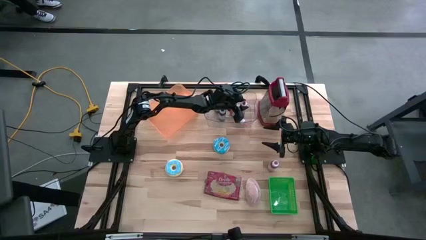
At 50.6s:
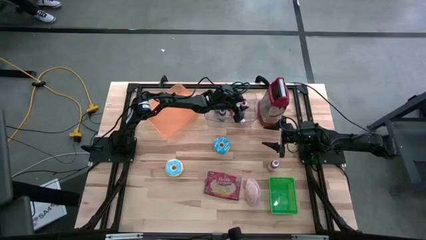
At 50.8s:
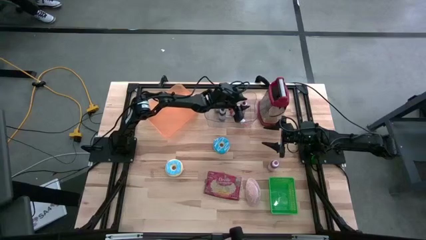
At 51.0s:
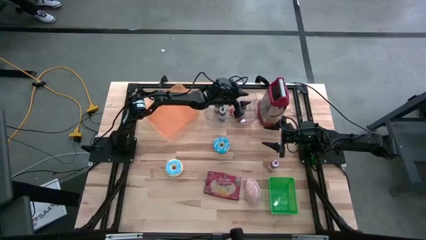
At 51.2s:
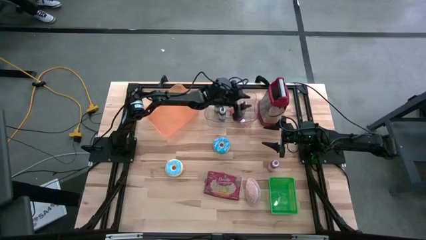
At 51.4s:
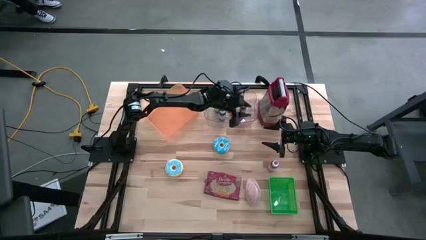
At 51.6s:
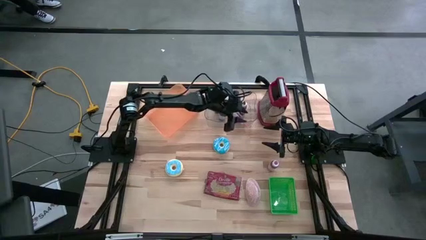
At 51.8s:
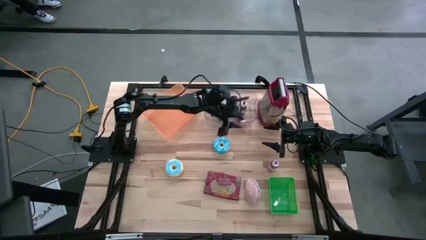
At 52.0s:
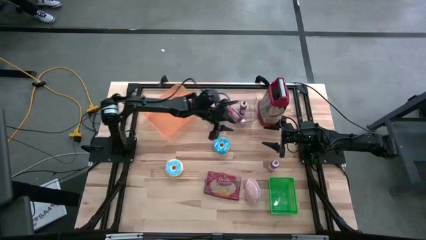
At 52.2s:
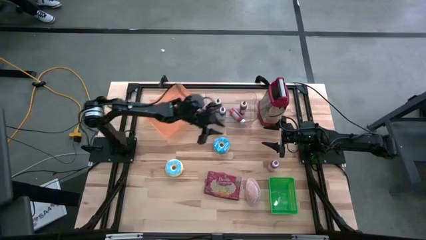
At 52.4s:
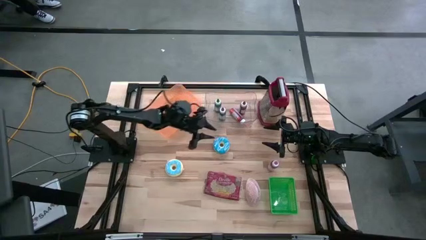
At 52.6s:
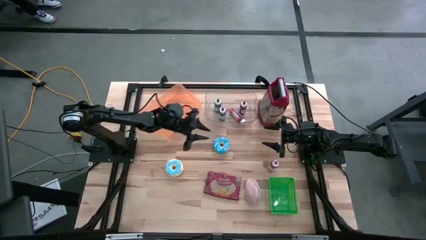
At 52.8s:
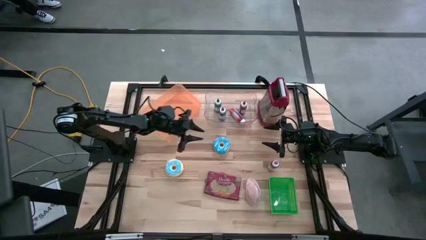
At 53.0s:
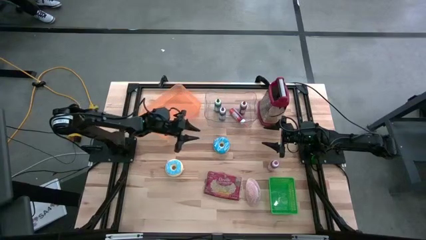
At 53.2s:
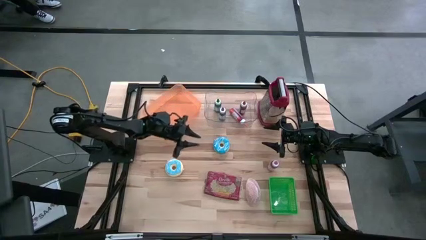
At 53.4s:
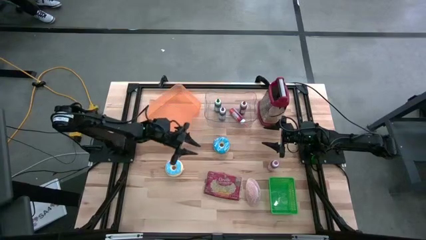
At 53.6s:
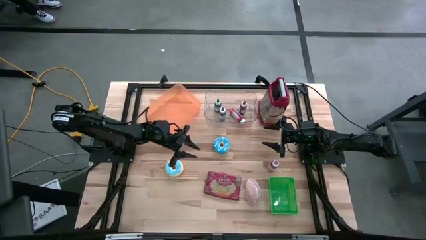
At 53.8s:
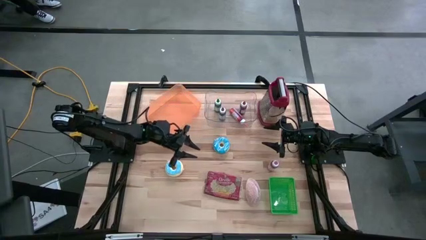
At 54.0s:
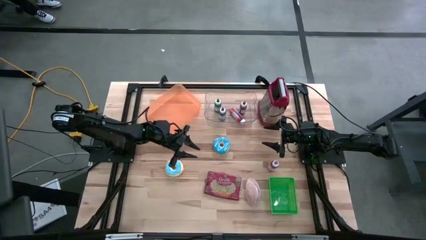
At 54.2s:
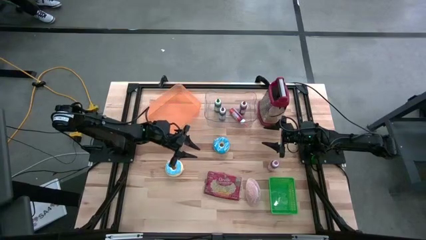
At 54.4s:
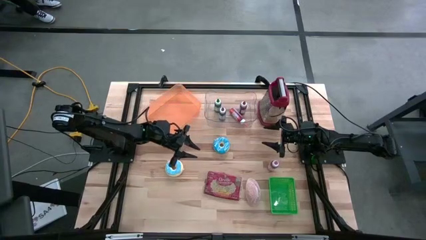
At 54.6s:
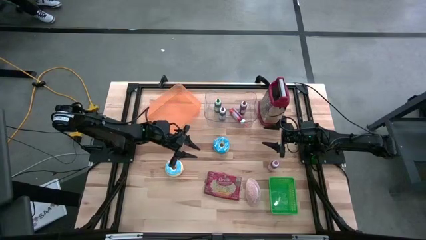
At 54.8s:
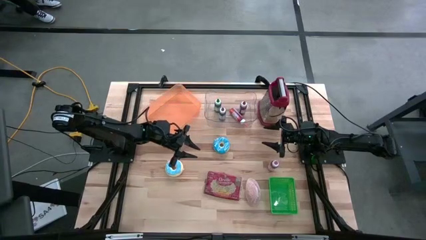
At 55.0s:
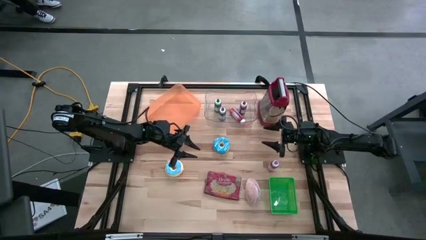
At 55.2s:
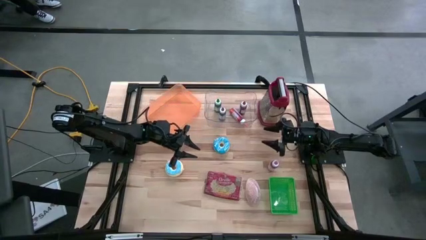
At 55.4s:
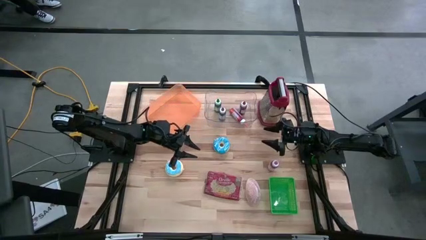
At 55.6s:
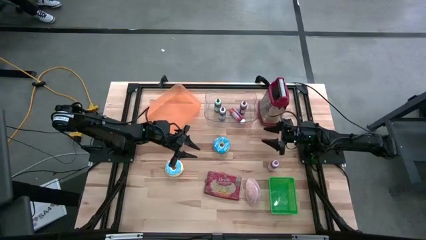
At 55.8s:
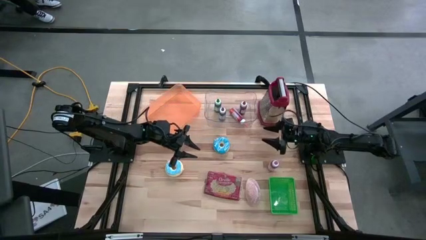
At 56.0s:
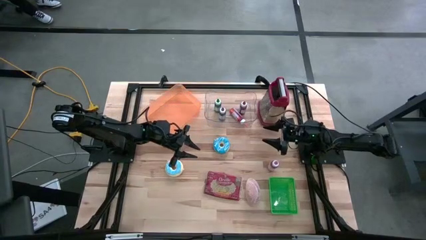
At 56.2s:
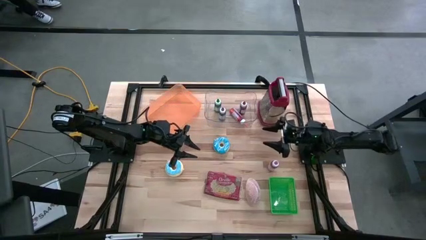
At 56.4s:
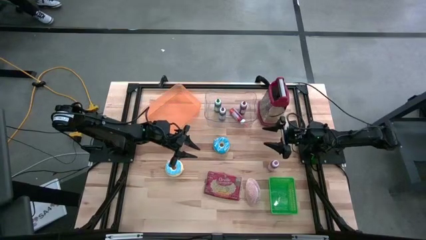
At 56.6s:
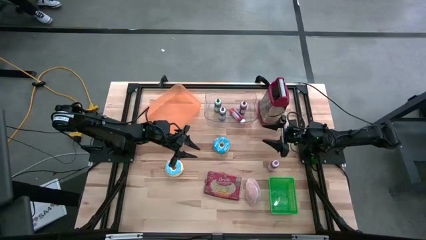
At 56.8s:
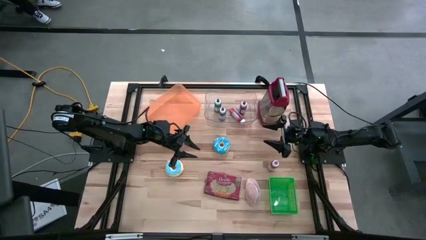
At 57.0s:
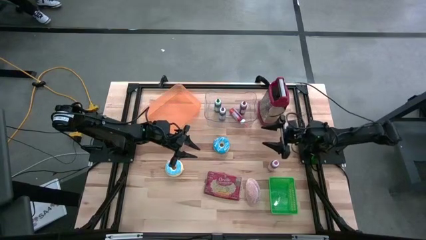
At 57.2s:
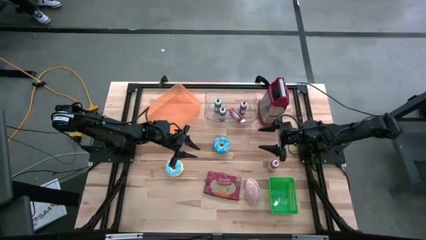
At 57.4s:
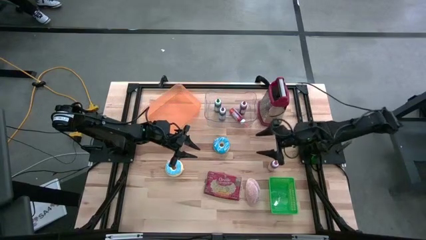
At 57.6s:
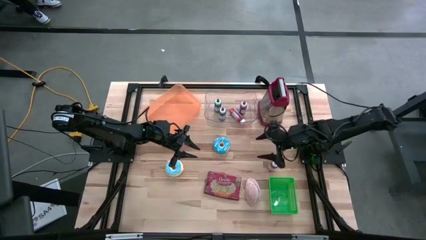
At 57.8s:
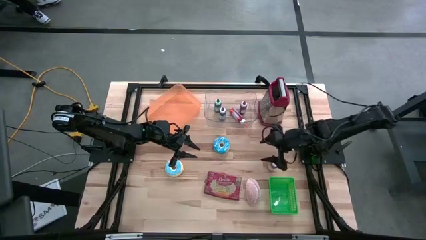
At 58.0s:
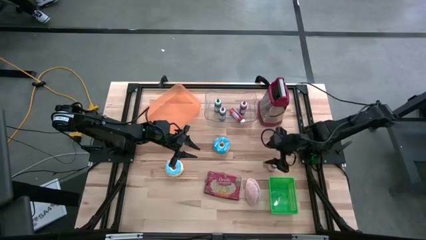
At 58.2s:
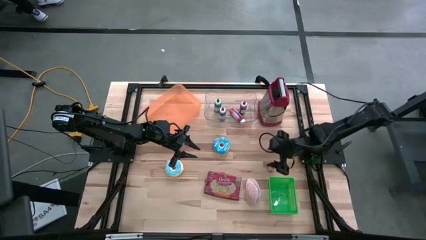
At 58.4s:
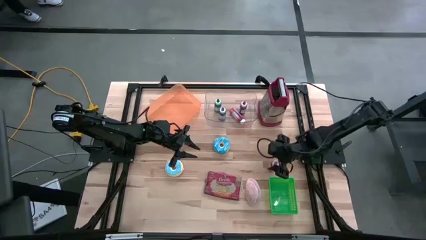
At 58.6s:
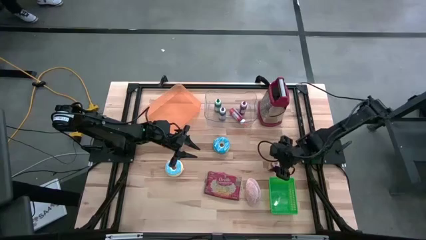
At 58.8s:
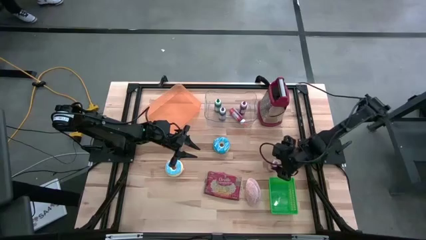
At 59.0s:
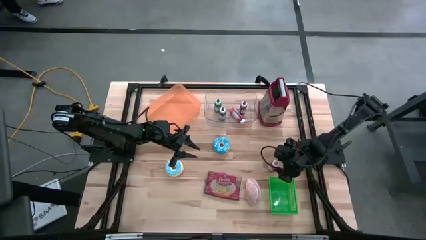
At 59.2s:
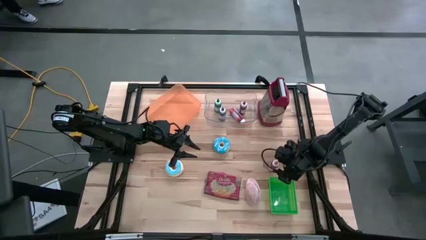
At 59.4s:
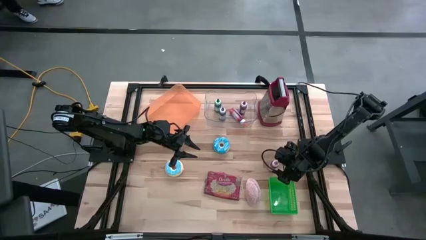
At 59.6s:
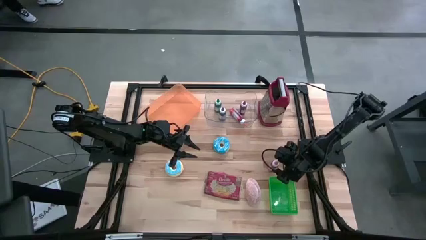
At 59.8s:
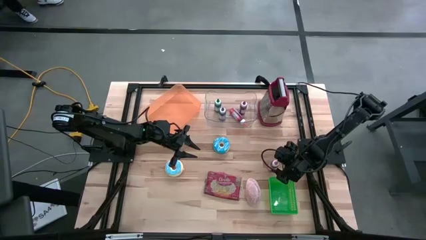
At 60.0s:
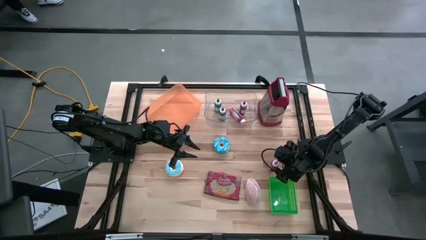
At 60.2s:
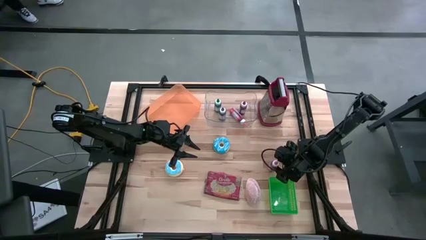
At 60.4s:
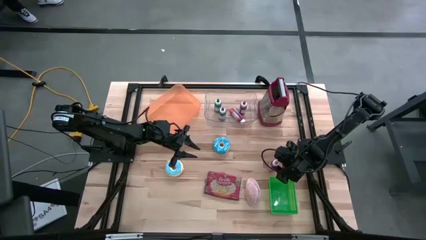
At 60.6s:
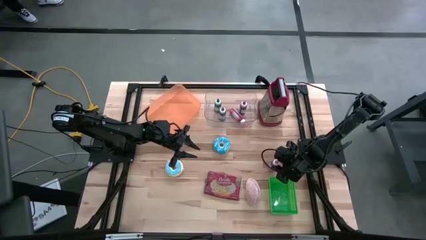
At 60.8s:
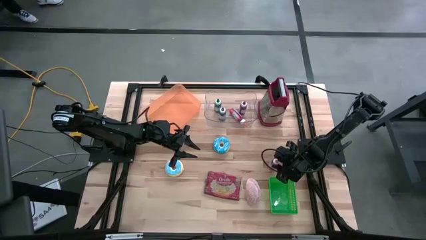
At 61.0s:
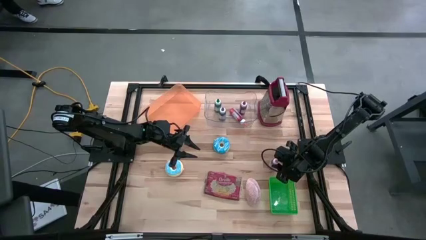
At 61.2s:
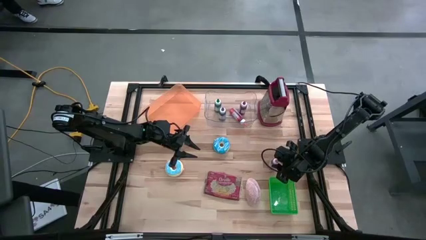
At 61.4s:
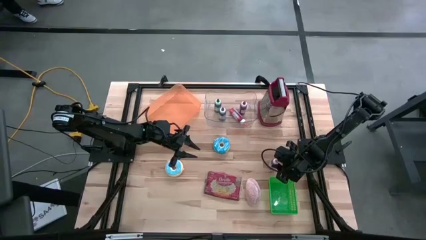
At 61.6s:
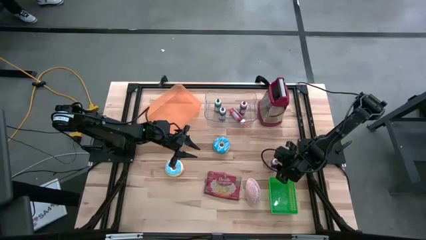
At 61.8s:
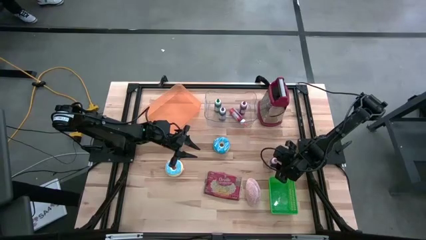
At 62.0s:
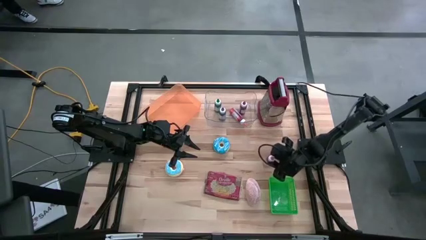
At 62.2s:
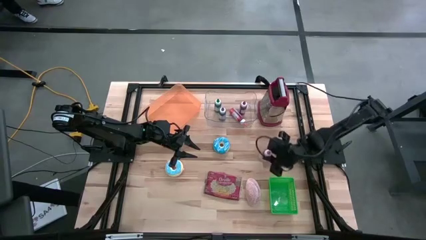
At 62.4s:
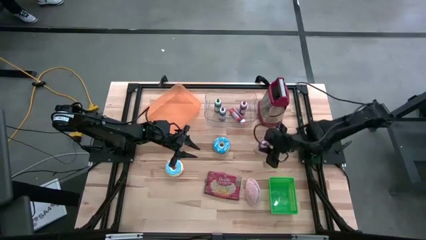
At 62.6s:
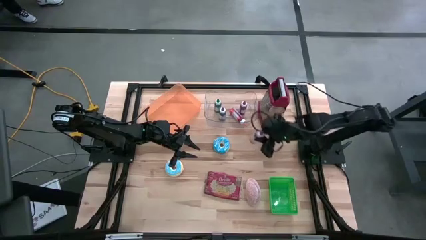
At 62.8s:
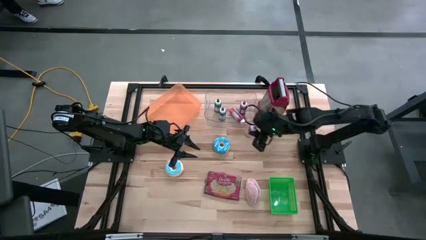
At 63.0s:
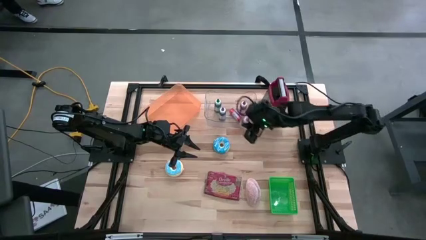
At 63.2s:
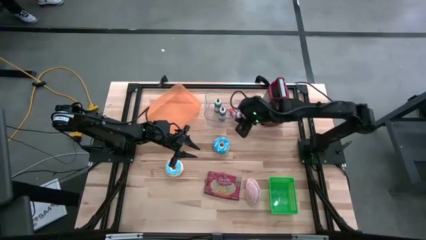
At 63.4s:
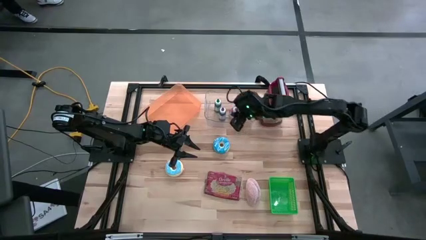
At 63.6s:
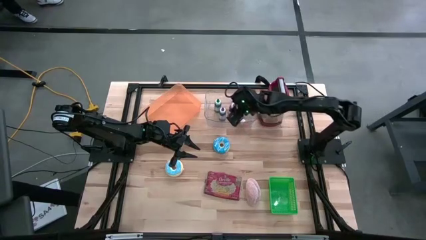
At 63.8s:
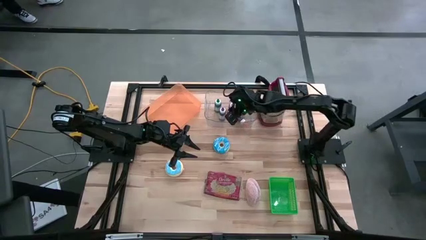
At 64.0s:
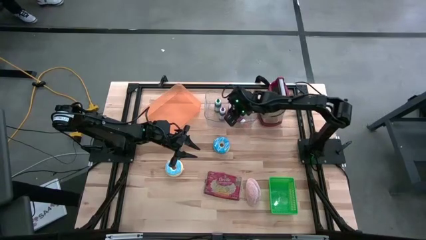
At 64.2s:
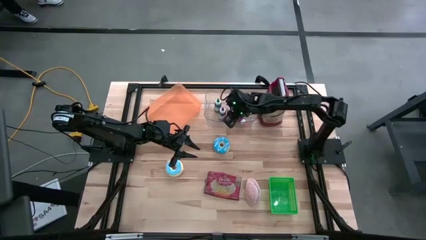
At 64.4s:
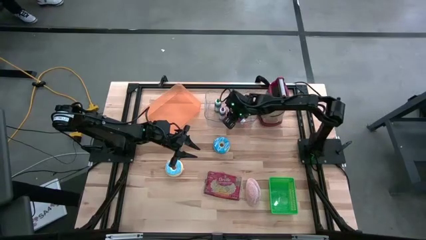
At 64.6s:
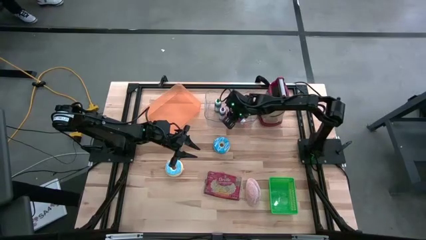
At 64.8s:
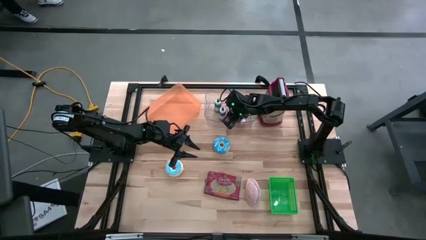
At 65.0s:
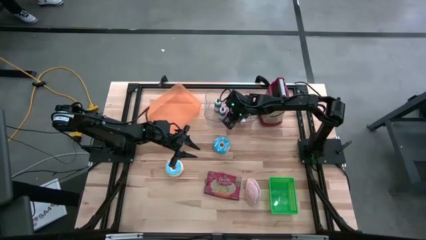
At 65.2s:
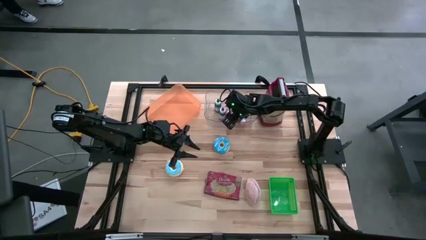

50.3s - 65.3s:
Put the left red food coloring bottle into the transparent bin
